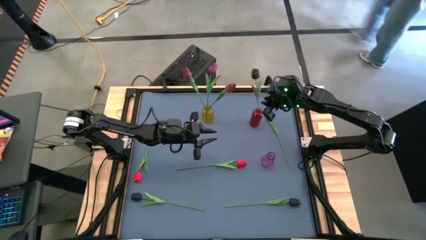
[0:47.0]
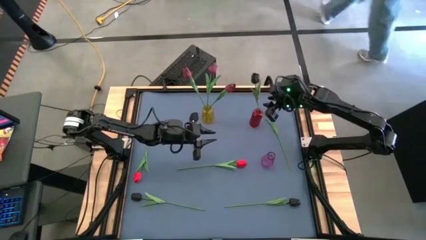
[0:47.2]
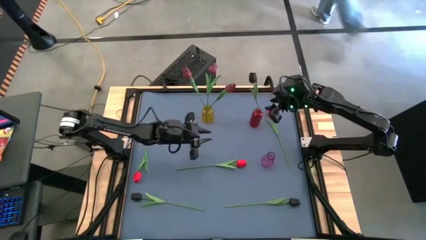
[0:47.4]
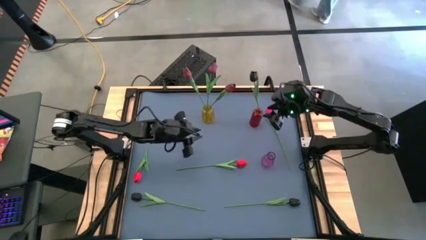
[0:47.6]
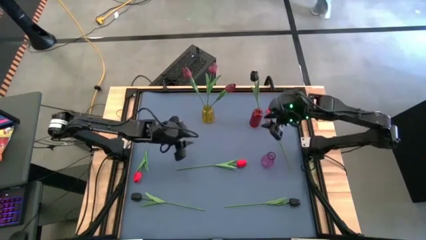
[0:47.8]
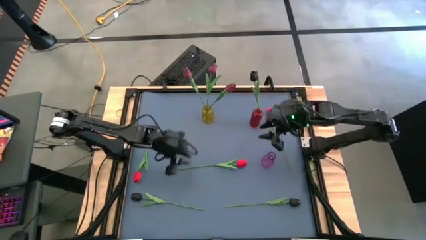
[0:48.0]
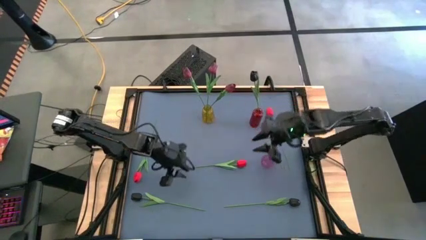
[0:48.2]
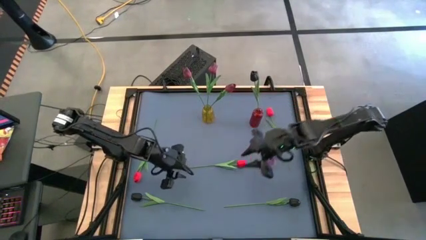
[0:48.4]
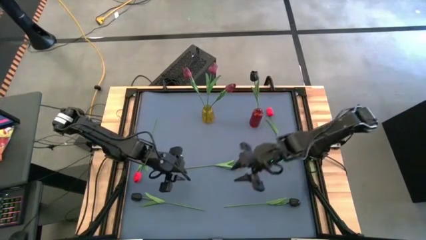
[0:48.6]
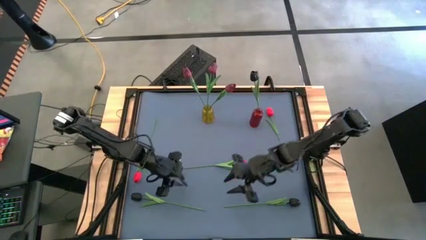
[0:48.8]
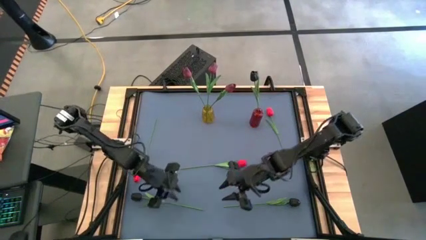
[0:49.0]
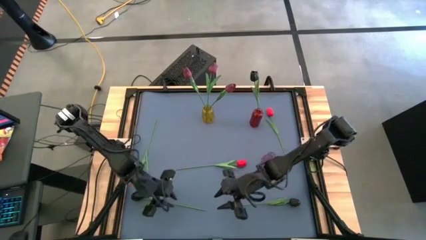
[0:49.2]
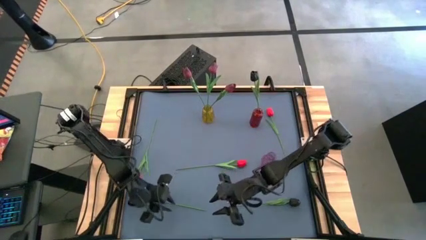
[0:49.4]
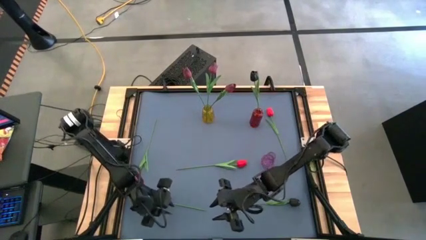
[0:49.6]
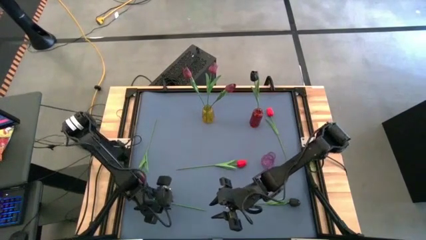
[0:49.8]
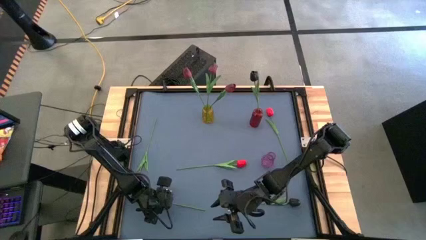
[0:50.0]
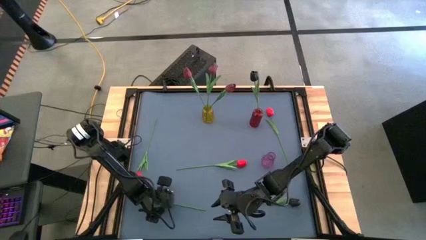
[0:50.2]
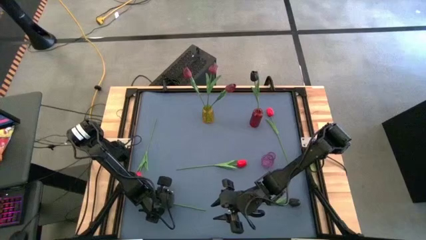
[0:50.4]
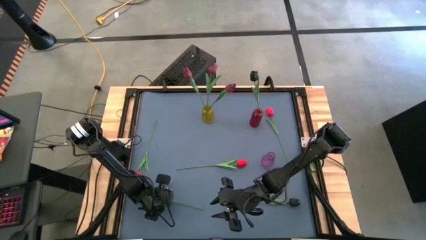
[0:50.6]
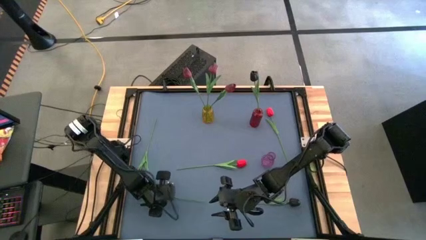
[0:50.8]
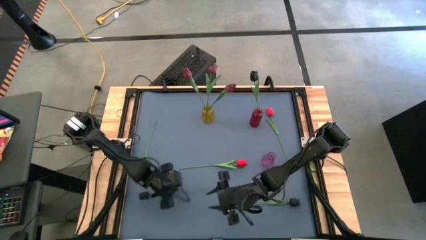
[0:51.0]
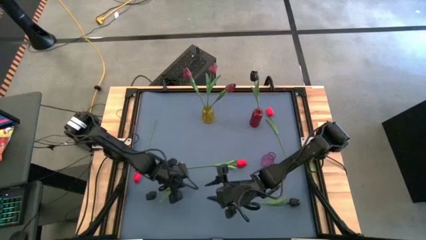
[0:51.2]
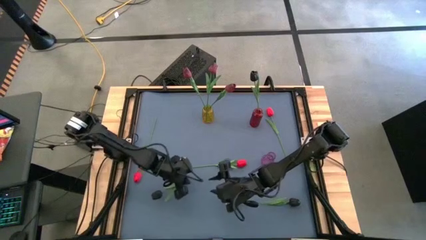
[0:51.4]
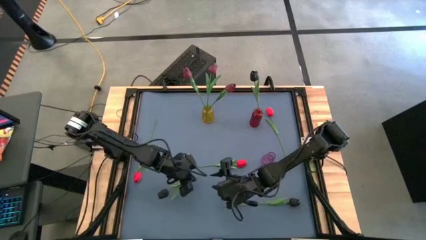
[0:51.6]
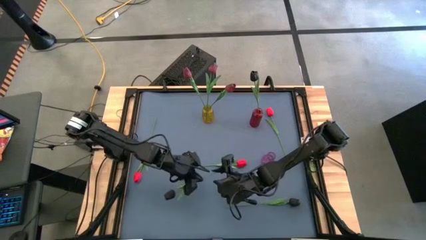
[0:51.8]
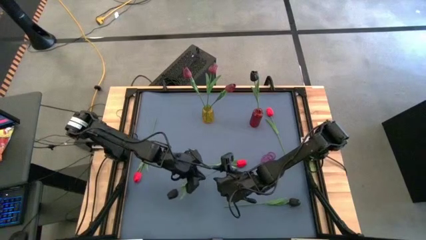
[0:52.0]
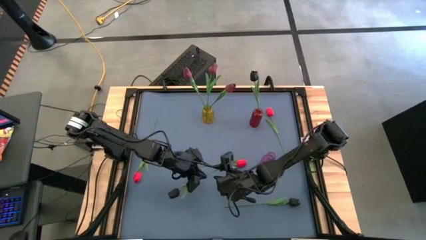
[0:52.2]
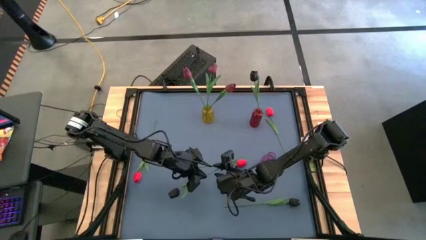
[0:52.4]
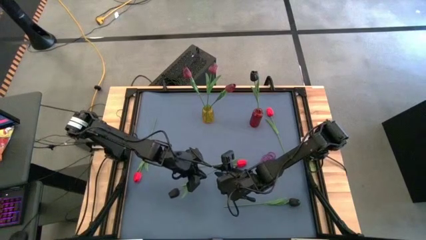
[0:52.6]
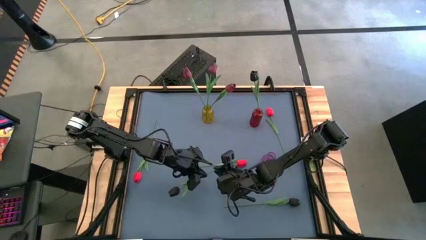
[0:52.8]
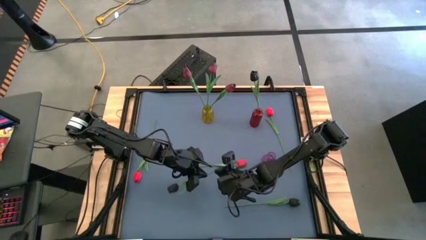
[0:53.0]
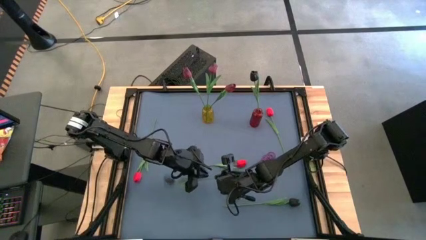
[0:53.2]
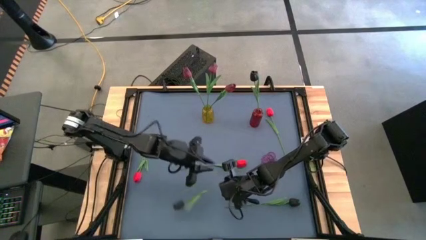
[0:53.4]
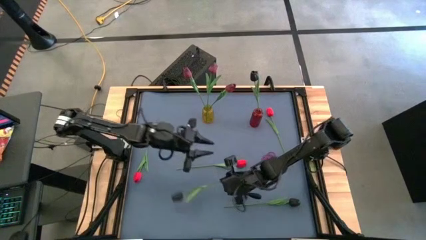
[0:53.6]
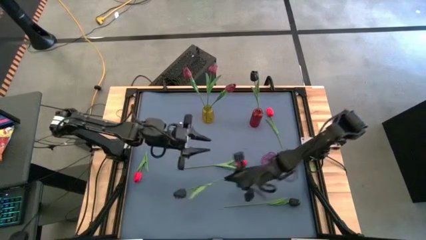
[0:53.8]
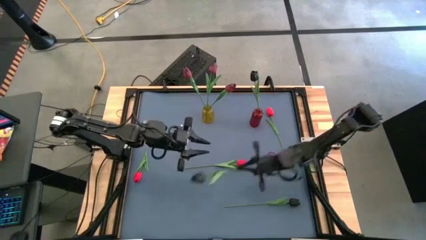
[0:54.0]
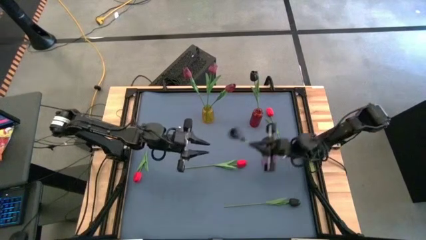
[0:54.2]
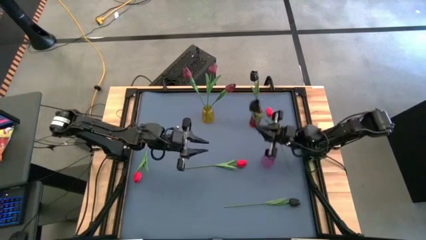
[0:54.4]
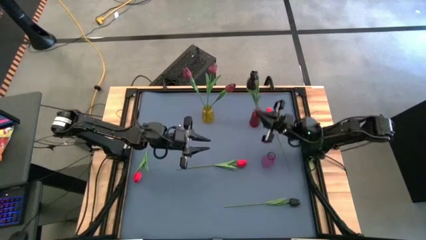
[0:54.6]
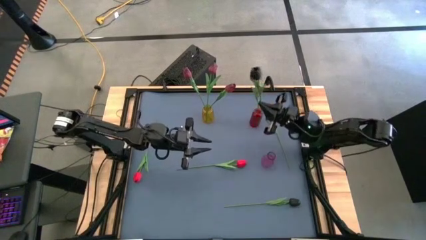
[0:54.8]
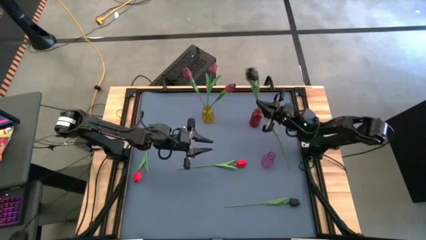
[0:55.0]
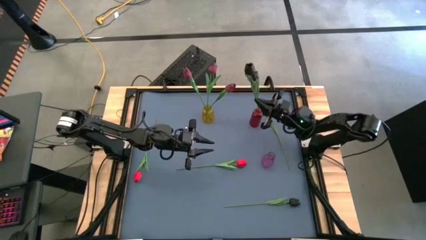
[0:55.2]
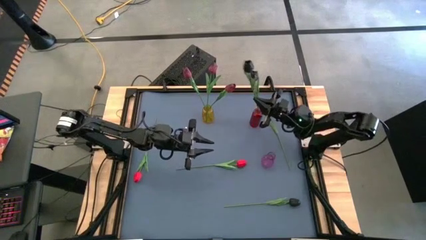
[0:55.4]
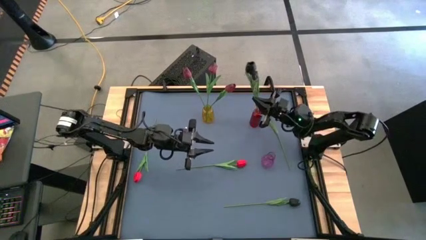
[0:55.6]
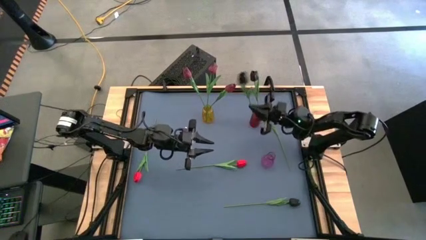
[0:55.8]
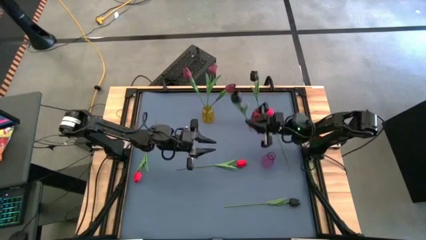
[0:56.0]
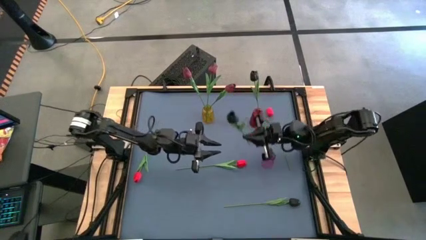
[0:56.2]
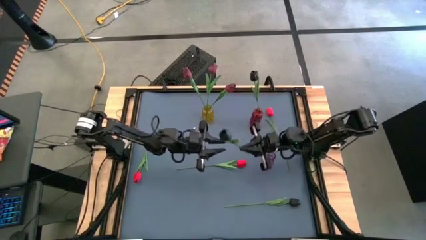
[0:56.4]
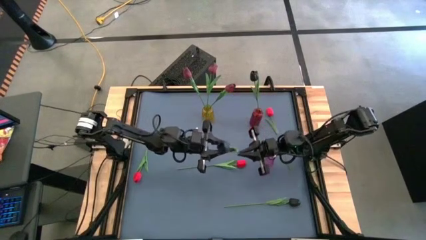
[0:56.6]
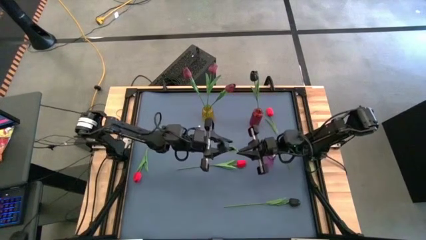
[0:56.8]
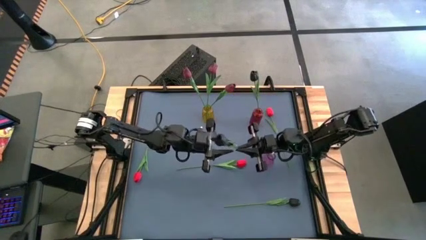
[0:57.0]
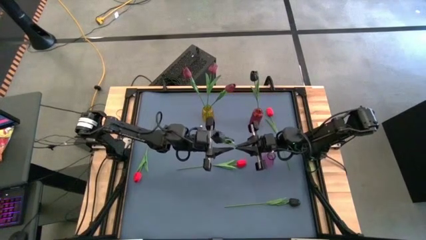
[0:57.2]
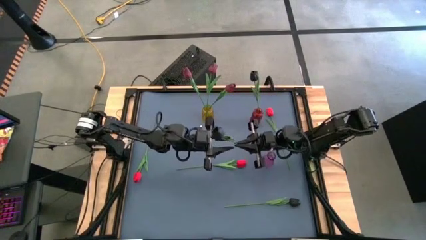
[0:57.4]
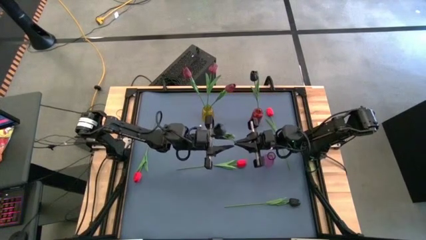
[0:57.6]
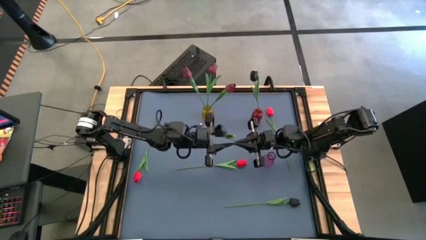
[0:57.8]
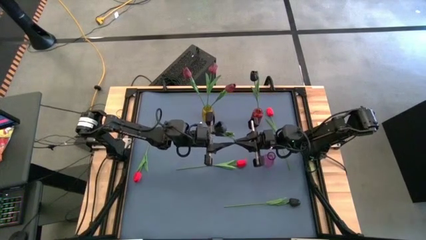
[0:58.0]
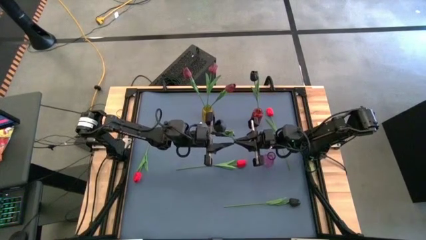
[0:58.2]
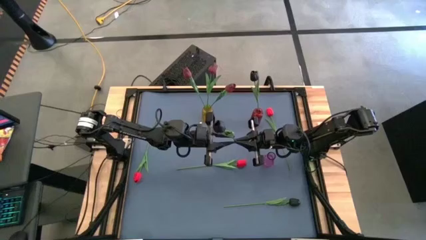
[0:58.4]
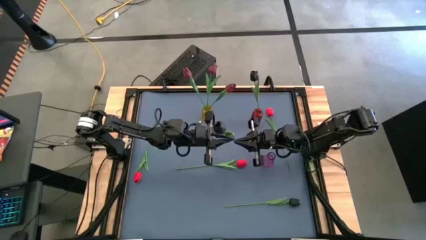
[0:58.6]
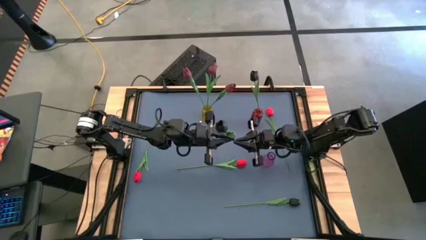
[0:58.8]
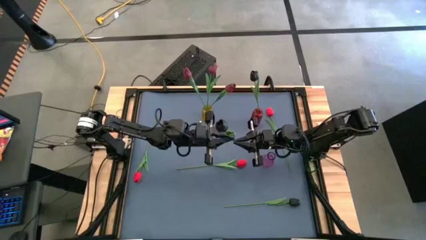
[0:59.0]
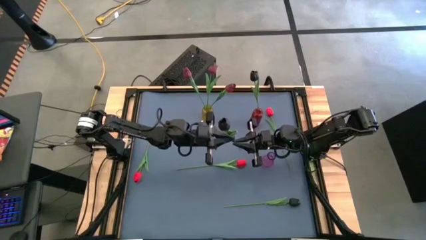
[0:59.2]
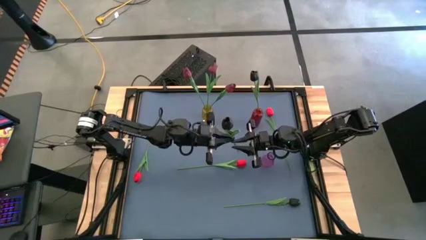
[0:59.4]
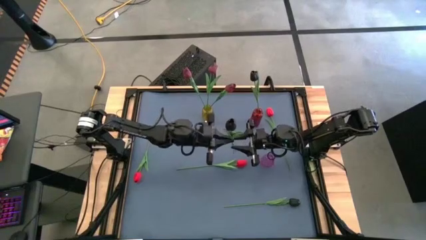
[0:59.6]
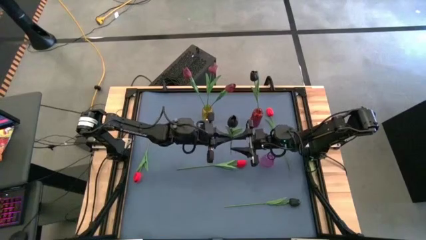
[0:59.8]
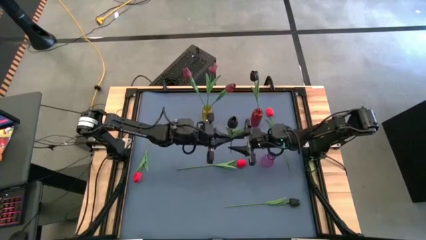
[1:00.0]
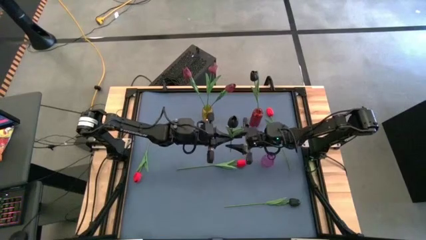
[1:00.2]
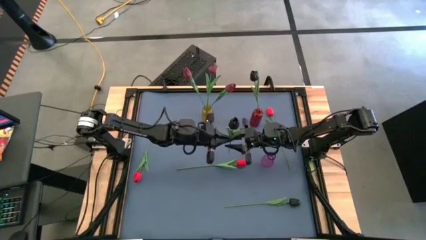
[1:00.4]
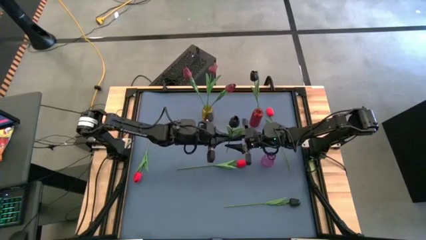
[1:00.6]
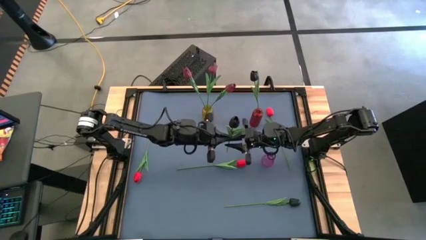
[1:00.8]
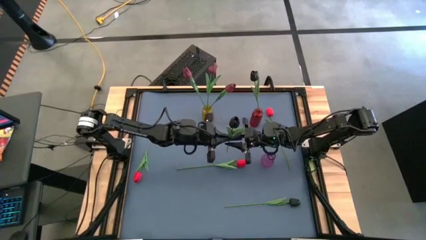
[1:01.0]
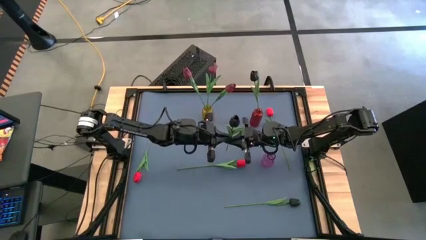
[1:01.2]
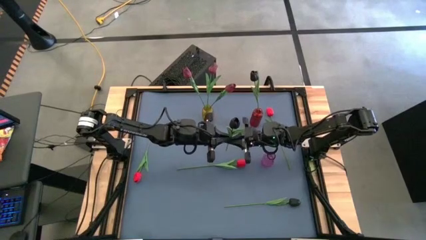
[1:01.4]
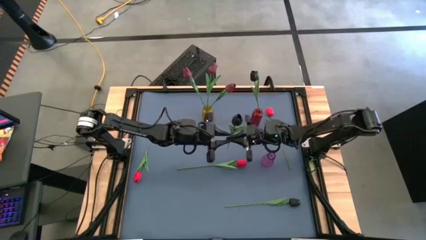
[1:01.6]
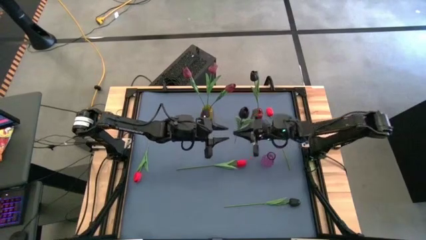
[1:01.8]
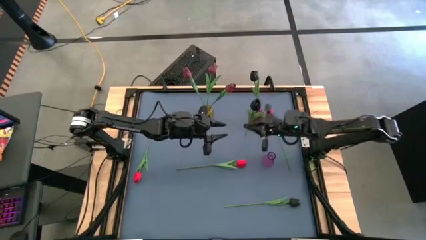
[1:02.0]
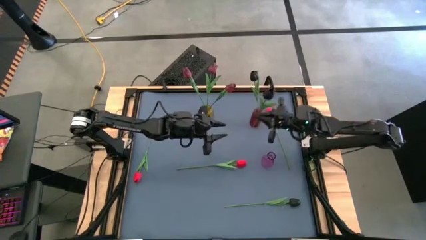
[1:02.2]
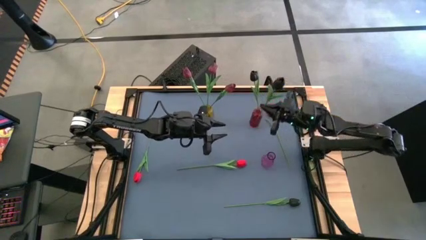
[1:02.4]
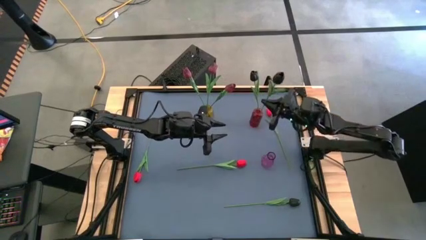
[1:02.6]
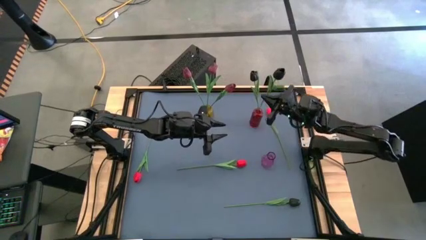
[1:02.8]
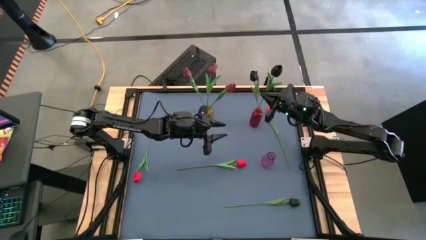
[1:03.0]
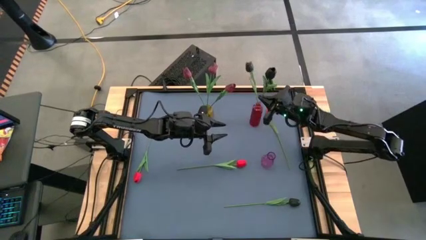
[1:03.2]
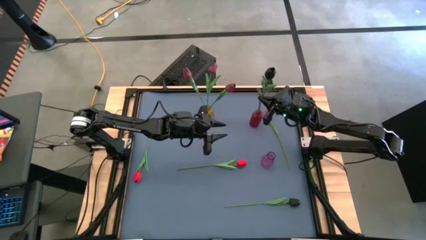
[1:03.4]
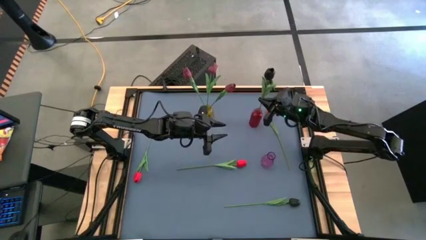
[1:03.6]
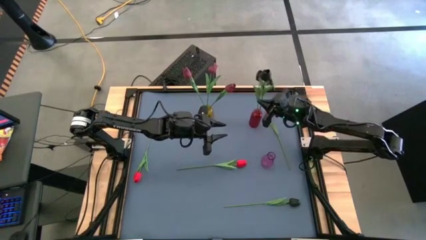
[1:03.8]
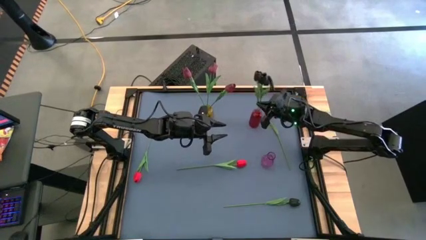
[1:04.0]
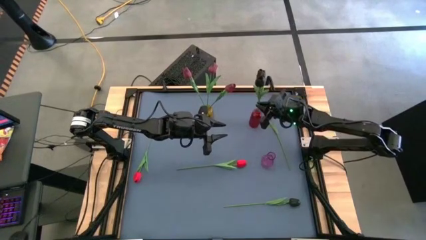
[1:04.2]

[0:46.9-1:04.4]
Task: Sort flowers into vase by color
Put the left black flower into the red vase
